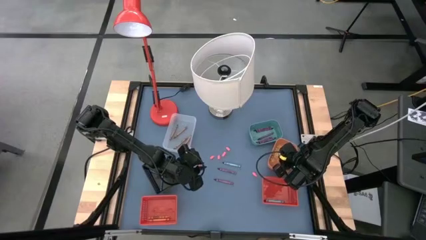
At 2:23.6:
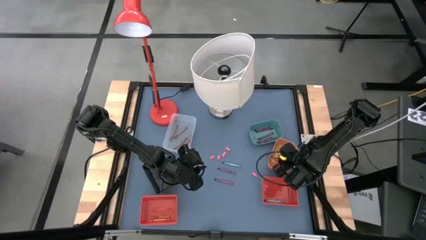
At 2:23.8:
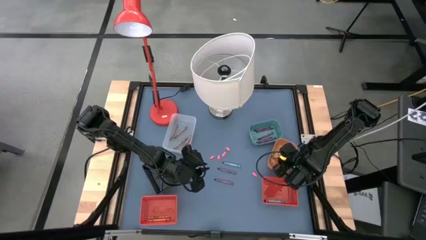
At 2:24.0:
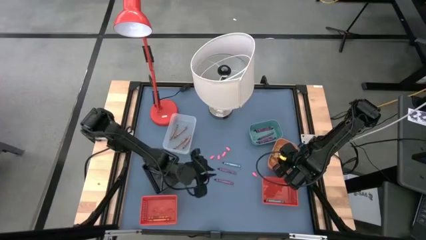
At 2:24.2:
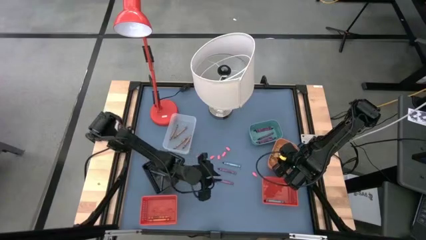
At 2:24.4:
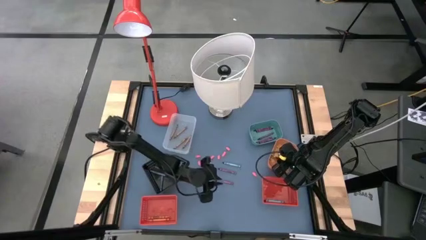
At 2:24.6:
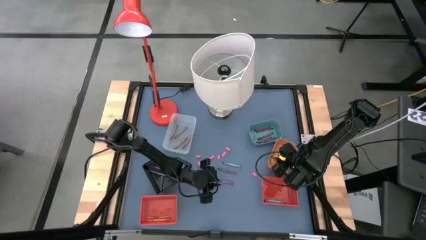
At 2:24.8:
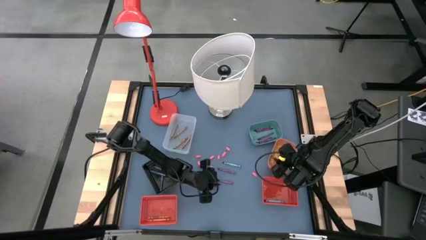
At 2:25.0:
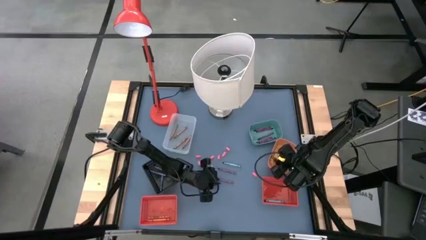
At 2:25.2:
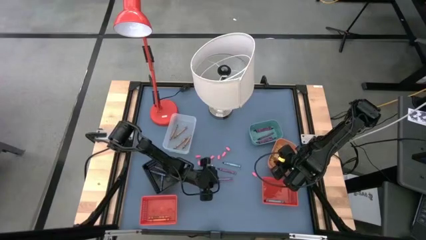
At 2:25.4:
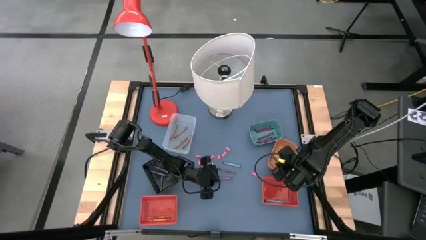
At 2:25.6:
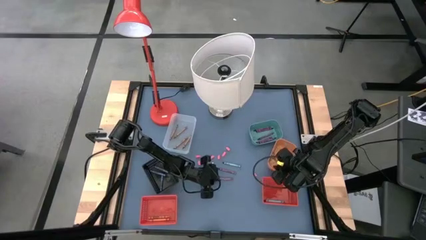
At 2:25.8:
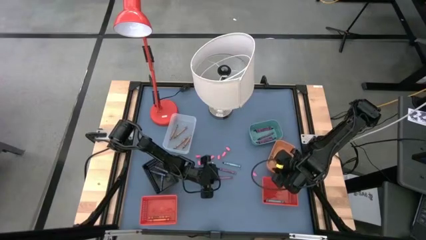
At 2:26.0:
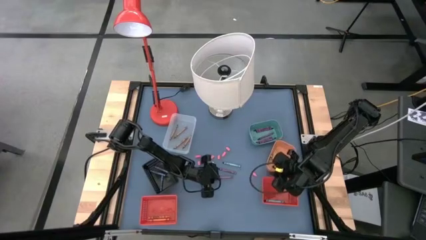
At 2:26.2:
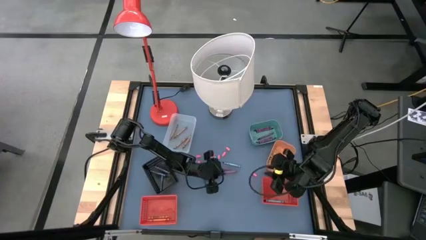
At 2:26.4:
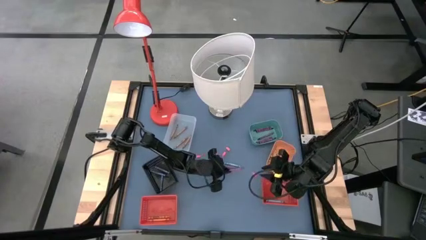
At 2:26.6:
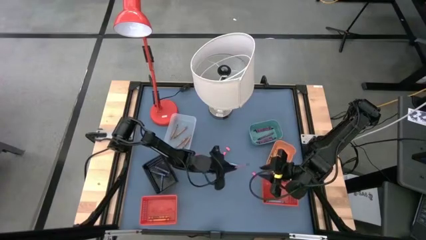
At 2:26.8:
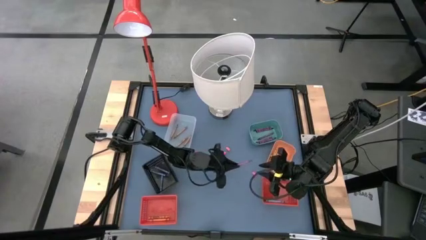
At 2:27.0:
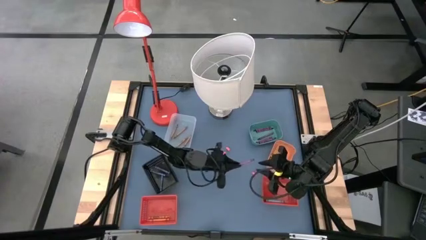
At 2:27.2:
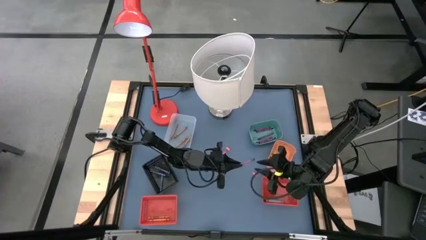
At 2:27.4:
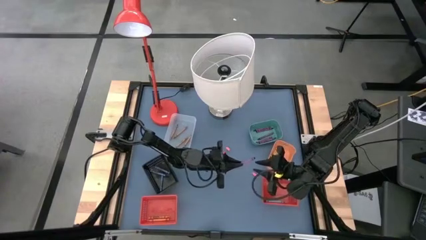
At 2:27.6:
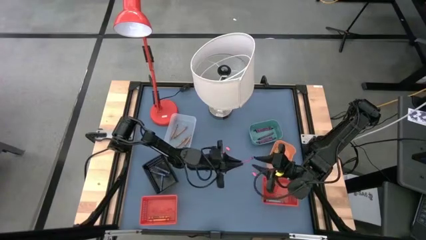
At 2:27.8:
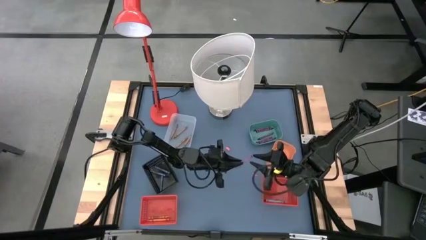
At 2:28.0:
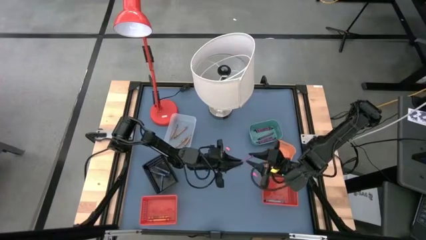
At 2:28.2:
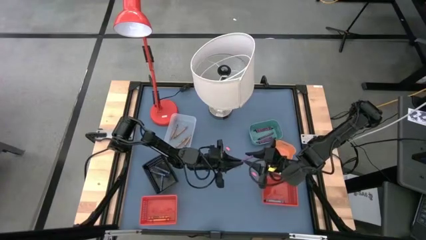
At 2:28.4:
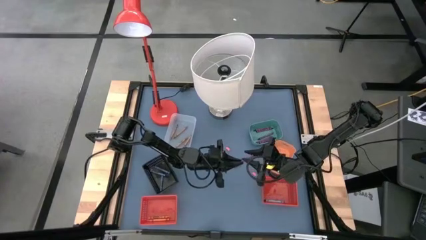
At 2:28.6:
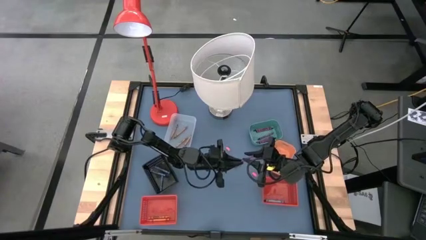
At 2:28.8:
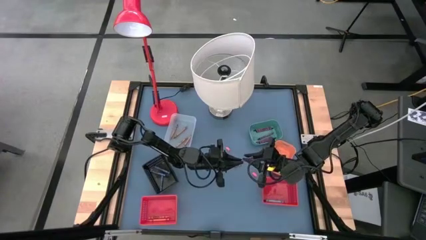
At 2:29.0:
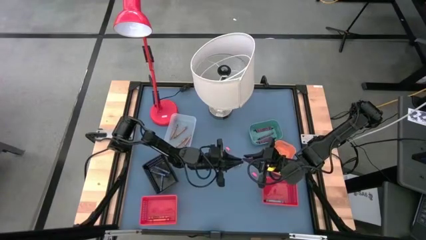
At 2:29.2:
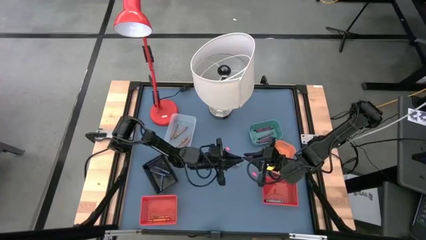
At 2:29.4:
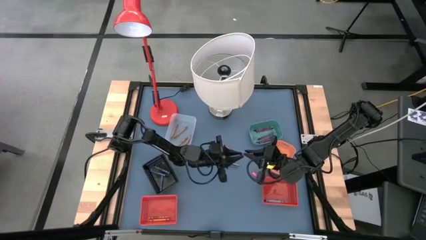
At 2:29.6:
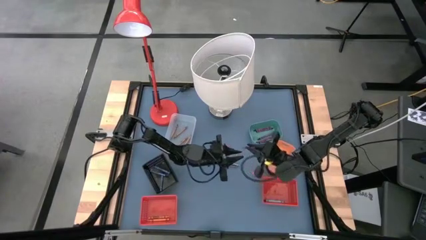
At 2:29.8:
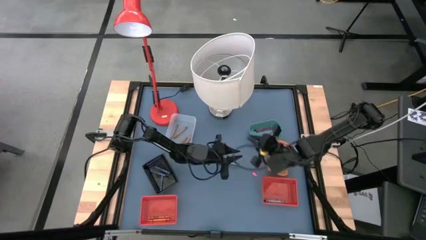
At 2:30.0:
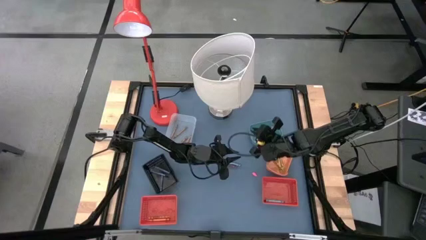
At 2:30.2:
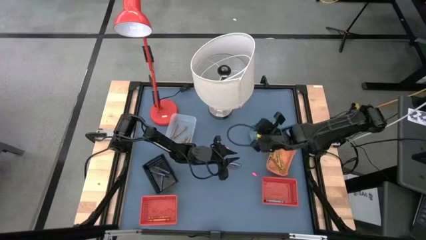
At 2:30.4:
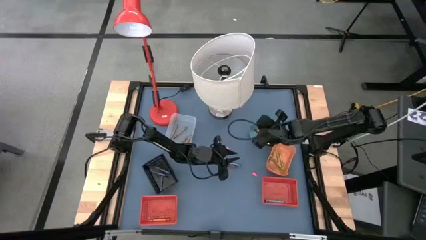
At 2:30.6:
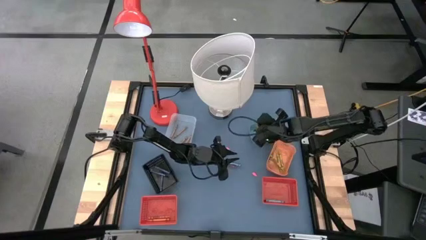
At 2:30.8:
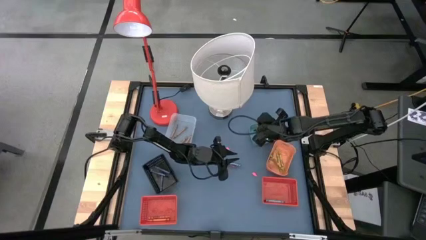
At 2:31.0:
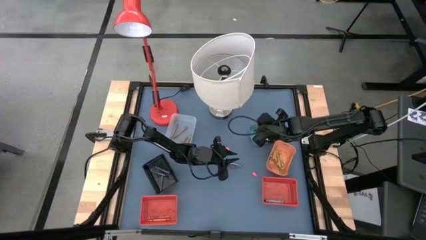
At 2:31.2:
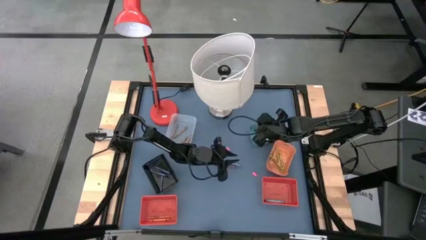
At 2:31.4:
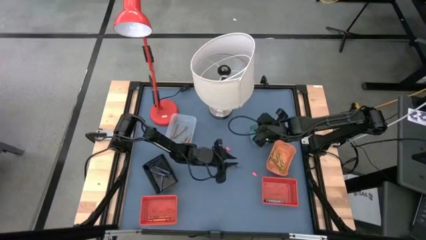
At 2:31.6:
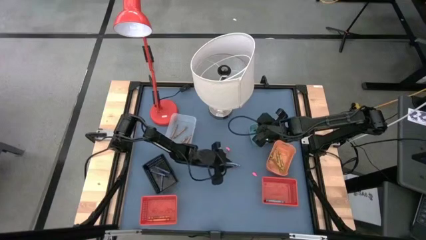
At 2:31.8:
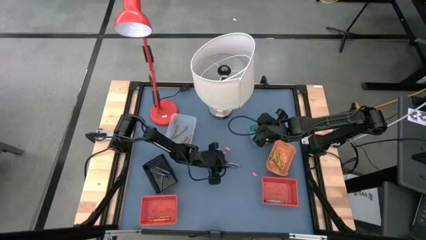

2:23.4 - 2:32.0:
Task: Sort crayons
Put the violet crayon into the green bin

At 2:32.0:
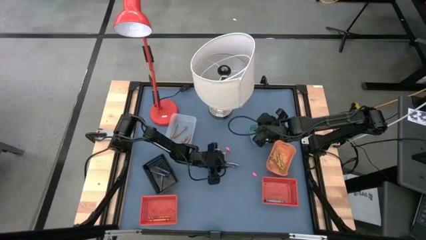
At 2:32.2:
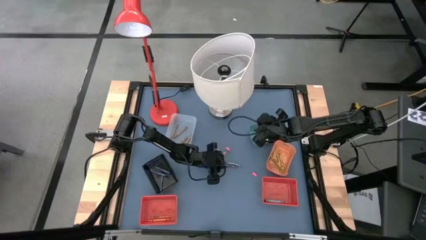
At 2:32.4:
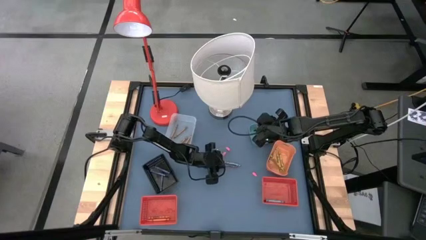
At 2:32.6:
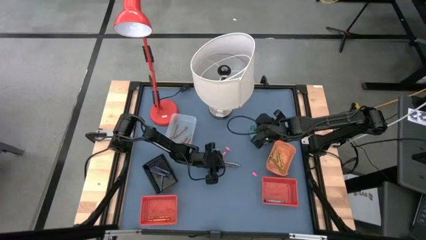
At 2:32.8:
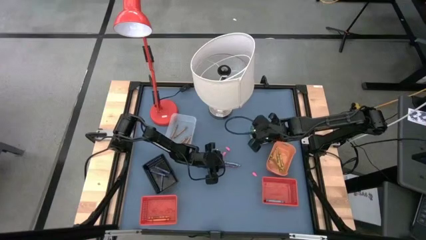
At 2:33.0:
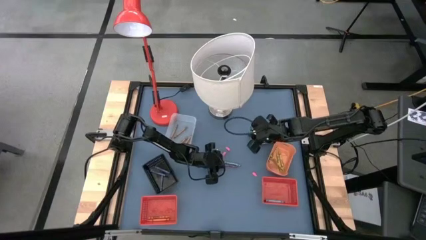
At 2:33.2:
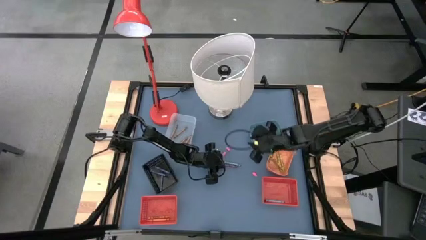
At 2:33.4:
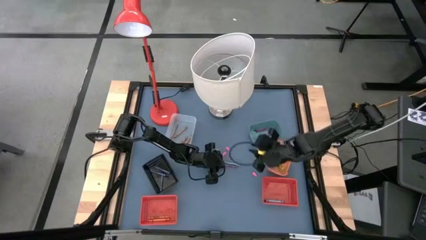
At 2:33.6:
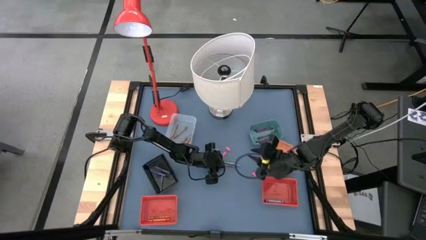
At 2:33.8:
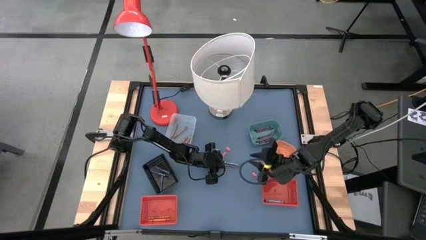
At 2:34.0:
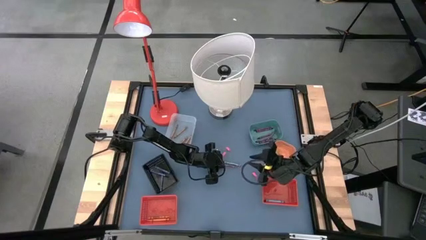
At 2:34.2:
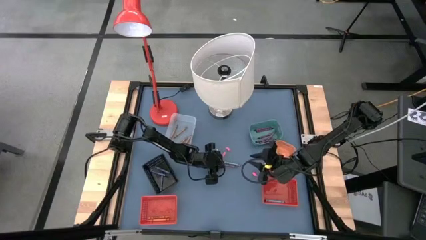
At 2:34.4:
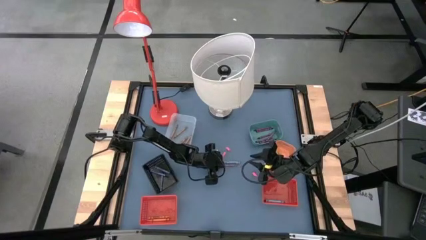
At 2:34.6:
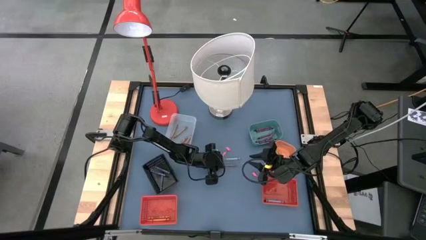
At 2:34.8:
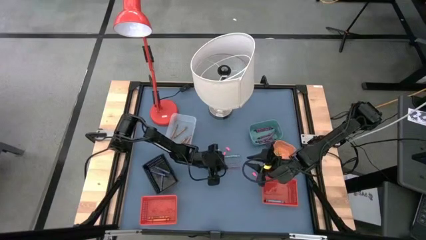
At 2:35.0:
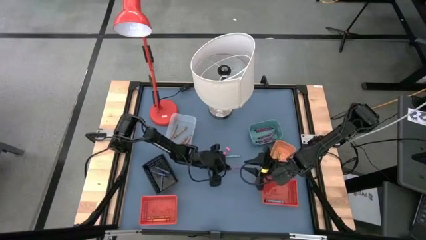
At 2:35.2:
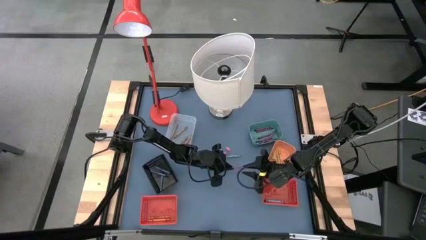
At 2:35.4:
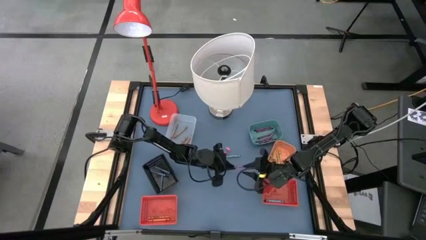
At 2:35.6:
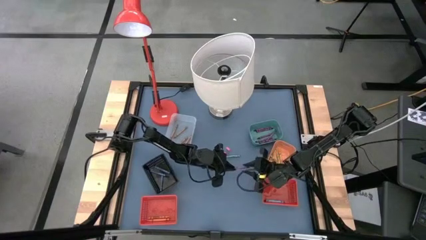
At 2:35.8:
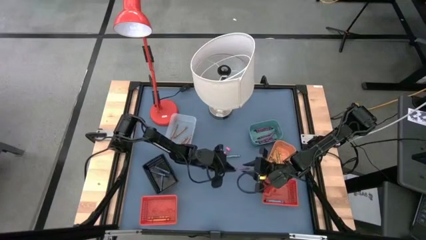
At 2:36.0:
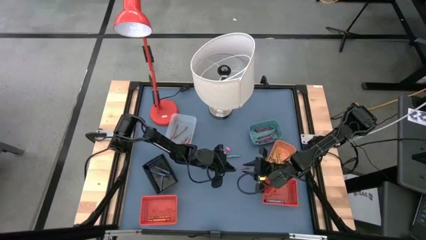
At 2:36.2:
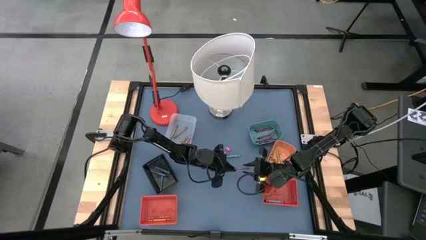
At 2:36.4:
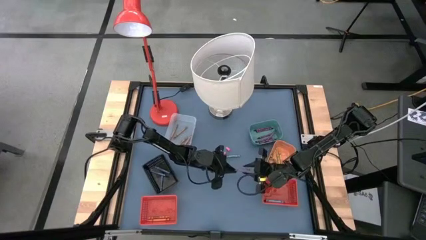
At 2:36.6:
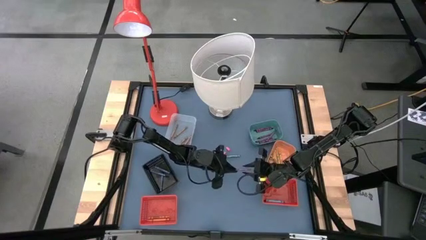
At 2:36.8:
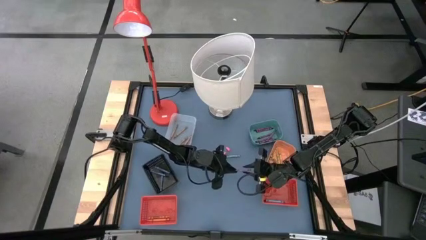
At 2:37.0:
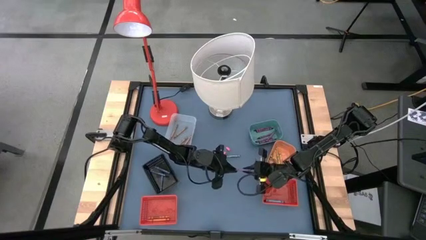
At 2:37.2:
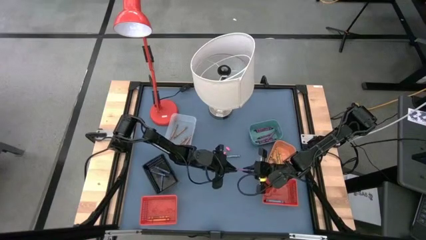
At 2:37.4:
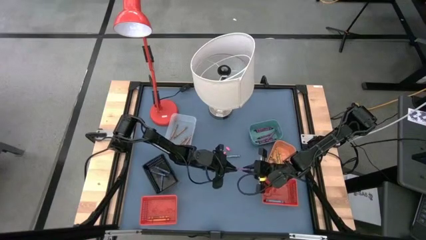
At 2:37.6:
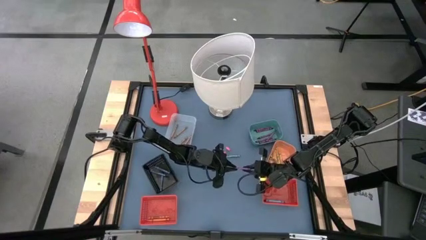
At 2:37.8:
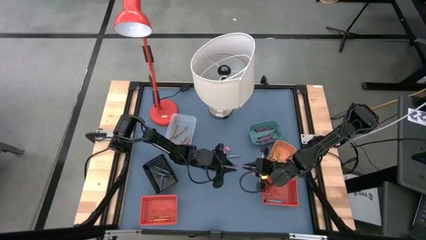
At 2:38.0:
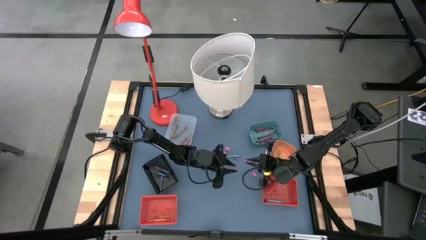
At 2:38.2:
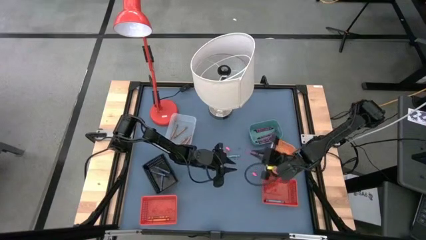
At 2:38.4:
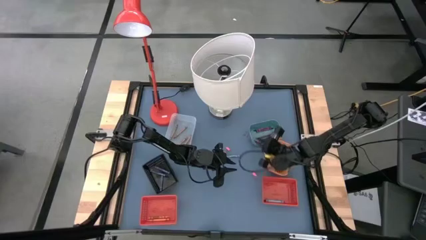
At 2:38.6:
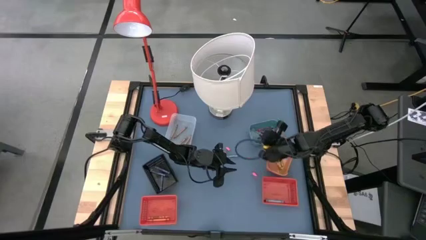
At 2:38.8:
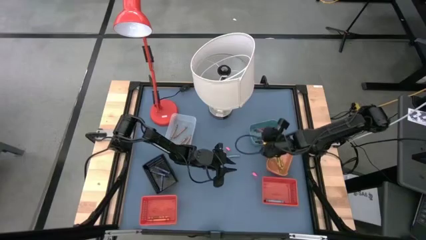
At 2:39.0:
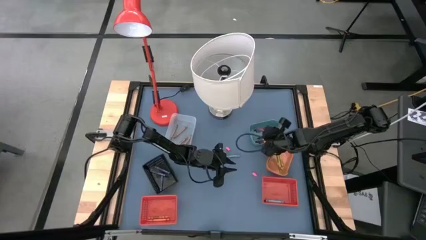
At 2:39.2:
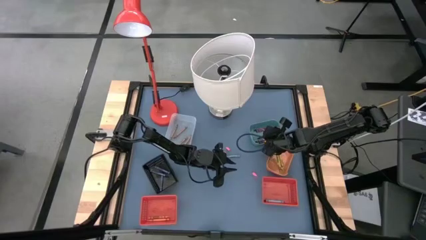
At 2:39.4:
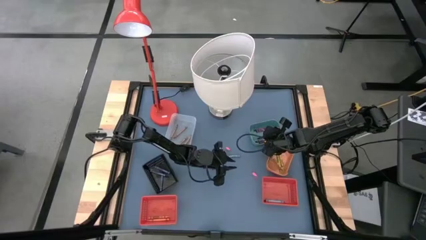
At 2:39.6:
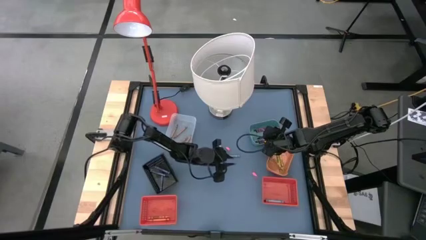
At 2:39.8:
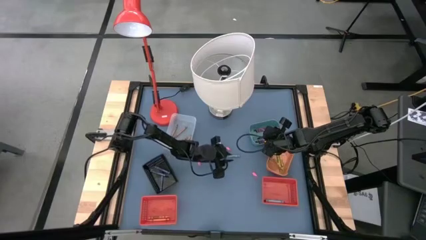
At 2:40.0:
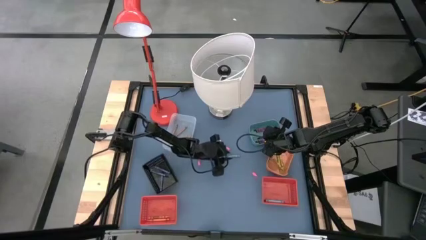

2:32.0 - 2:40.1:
Put the violet crayon into the green bin
